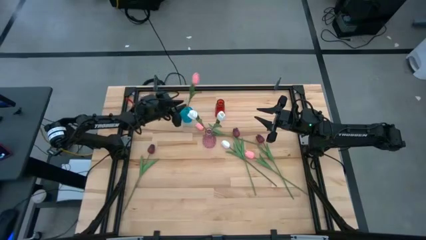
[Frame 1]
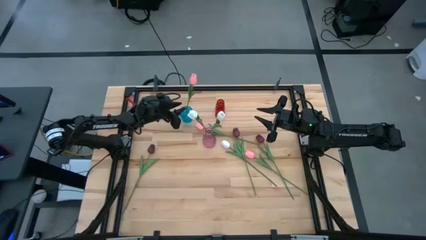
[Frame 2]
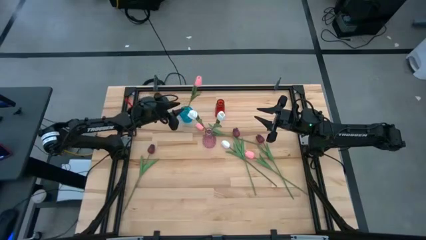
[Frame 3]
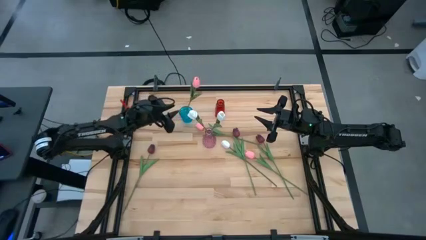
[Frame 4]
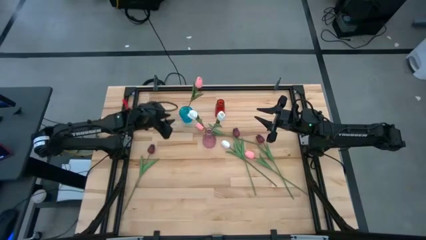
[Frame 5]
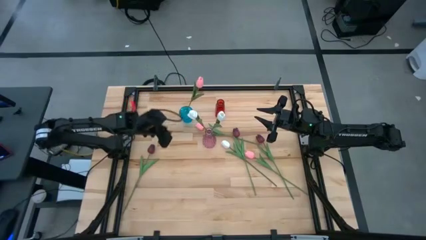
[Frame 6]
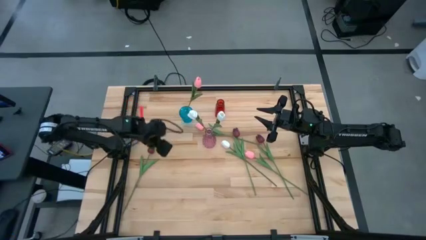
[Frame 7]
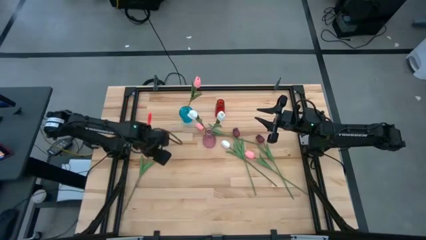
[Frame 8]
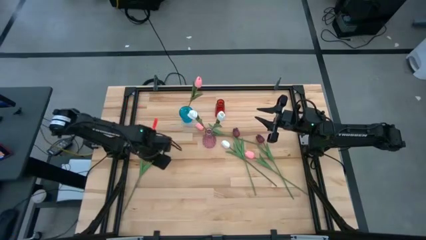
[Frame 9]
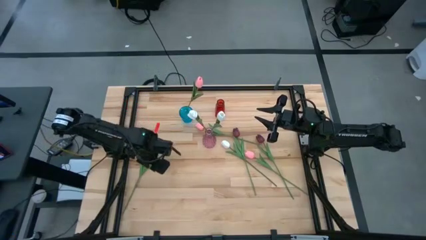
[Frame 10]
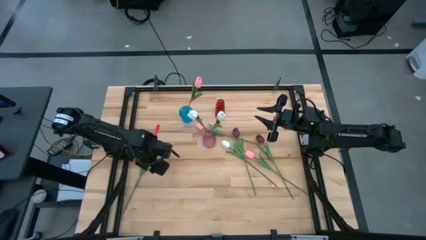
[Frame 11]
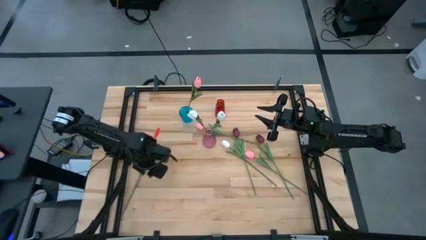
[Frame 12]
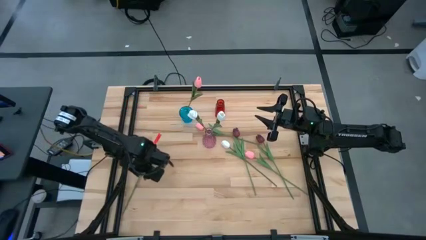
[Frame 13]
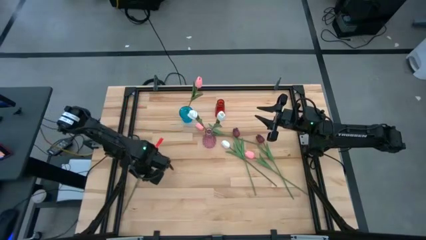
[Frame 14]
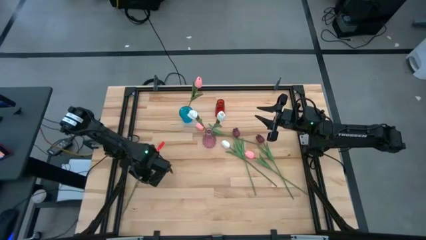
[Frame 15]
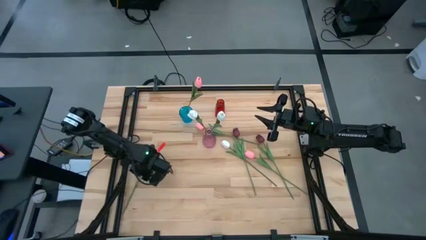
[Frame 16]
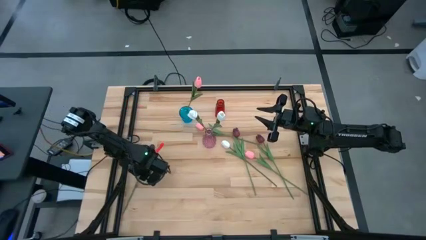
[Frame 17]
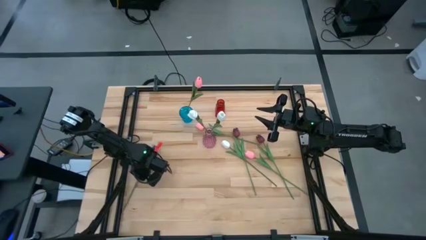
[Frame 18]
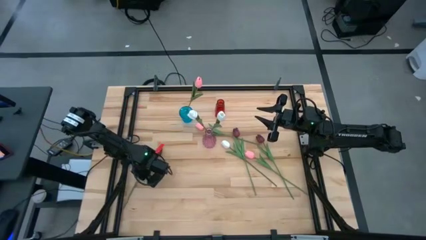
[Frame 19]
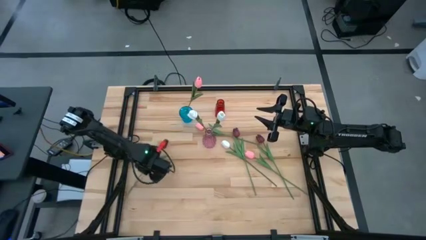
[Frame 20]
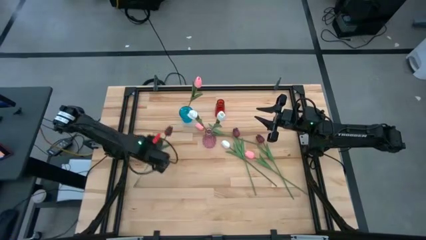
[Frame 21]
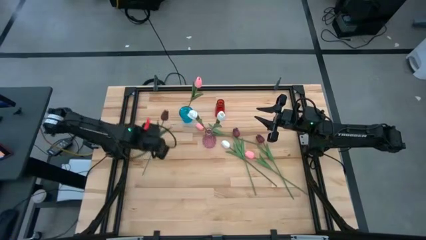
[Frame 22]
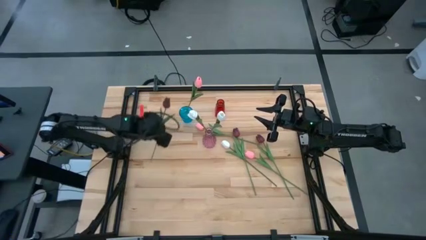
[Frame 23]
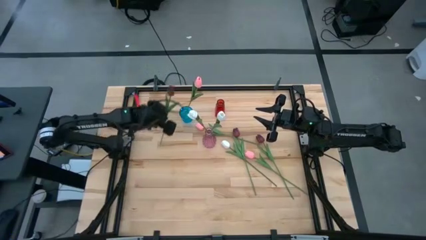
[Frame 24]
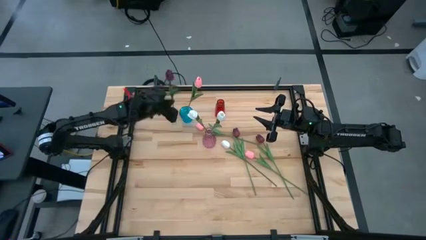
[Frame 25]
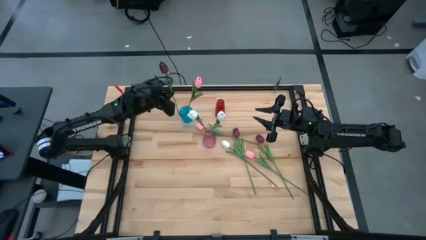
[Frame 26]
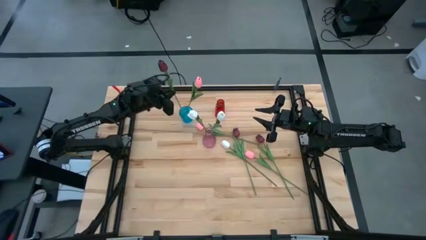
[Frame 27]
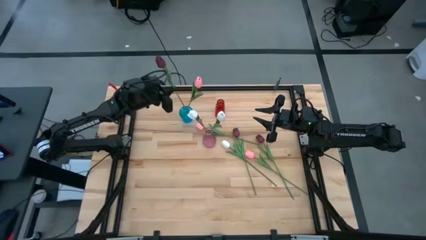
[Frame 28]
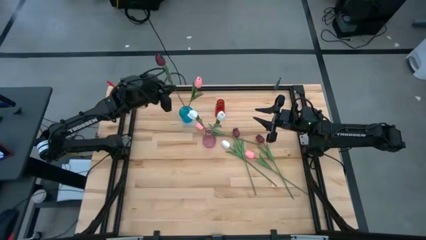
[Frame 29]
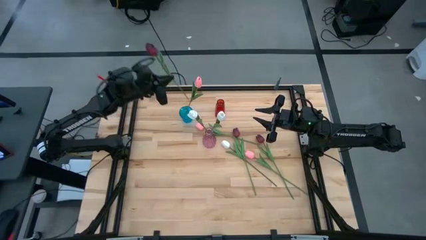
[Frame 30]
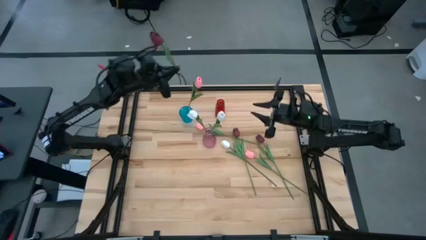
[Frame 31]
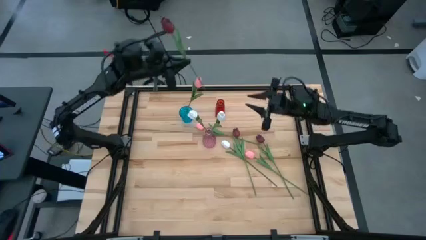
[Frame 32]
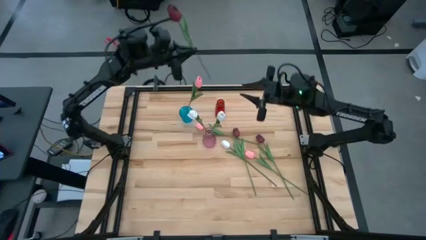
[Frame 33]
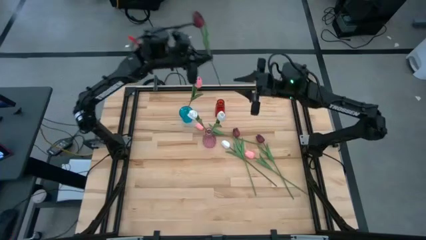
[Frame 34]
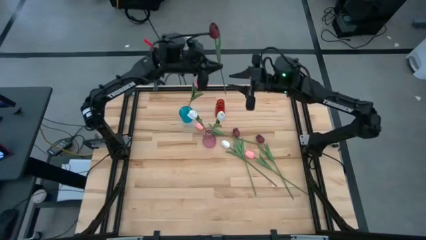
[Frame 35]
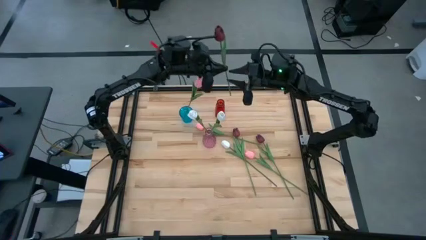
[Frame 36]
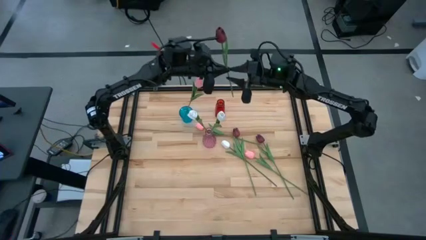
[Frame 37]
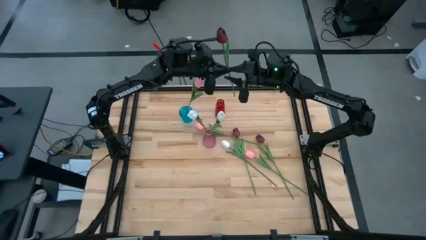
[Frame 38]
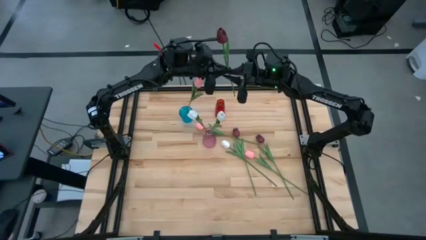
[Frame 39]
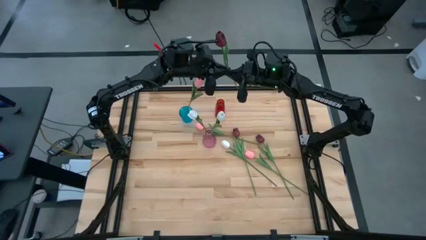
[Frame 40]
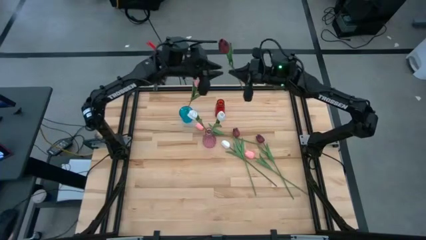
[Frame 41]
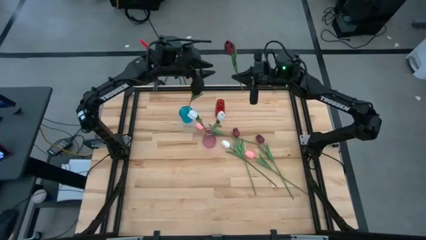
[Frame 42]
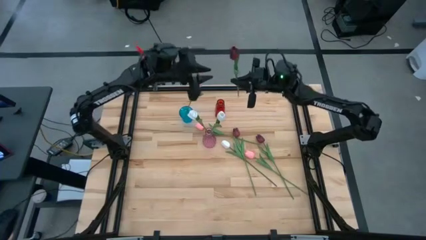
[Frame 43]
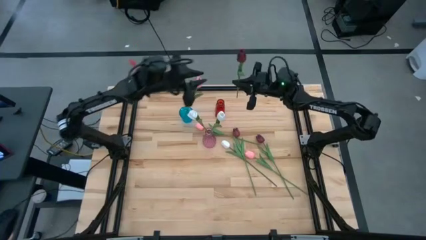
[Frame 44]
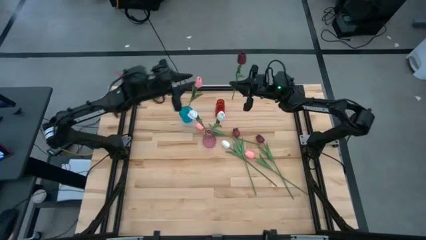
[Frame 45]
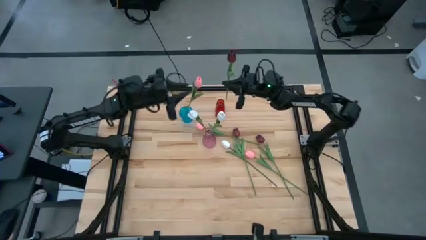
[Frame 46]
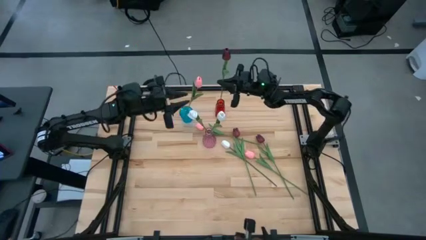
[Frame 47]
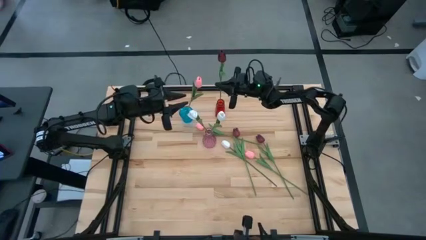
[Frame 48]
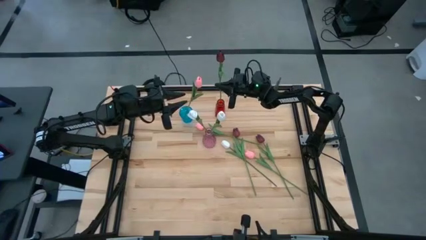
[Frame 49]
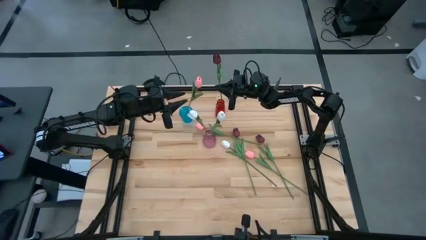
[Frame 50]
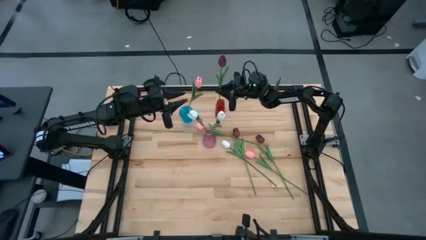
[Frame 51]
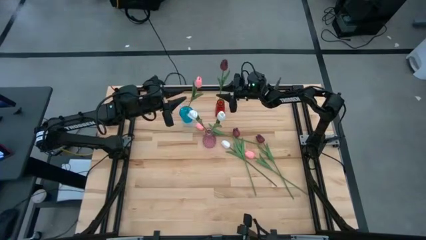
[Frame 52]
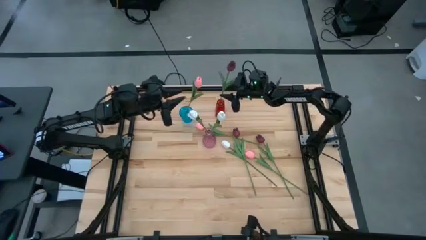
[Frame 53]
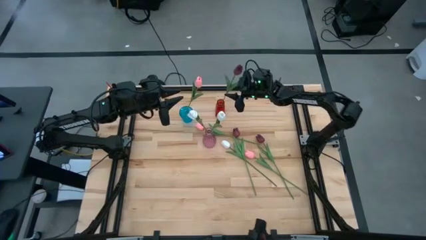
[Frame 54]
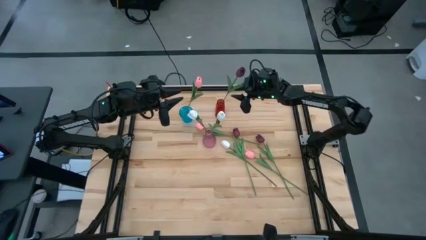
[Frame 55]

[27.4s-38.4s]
Task: Sort flowers into vase by color
Put the left red tulip into the red vase

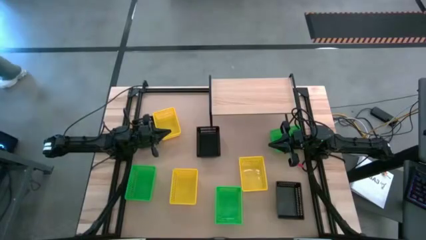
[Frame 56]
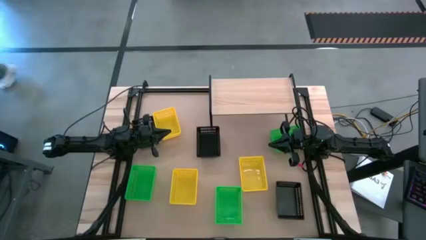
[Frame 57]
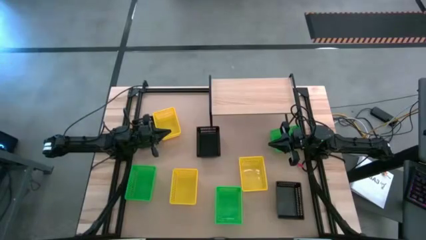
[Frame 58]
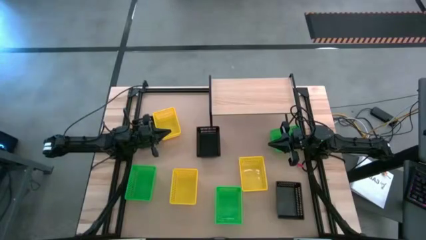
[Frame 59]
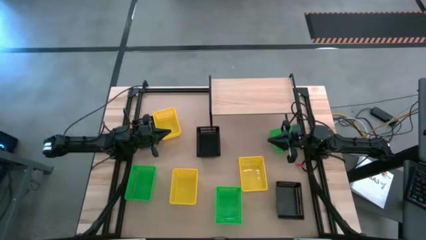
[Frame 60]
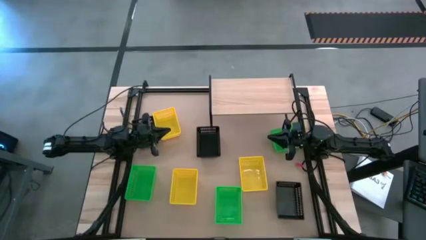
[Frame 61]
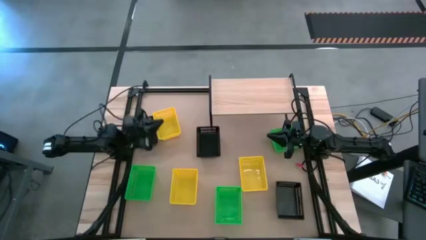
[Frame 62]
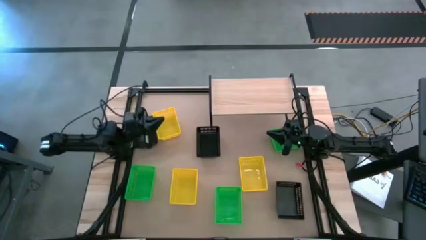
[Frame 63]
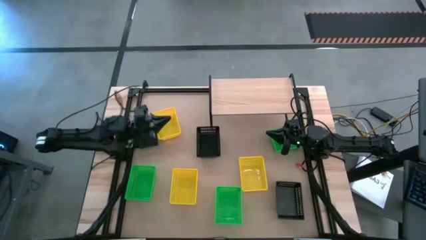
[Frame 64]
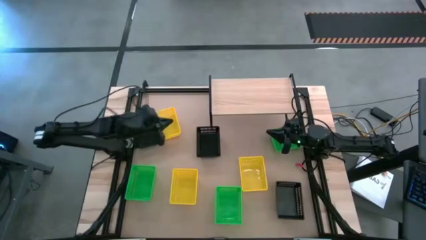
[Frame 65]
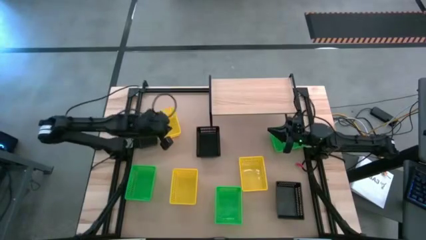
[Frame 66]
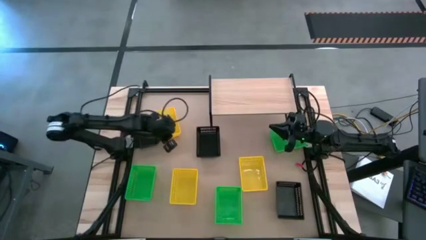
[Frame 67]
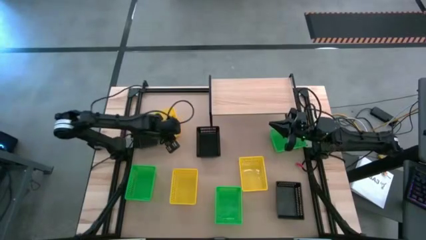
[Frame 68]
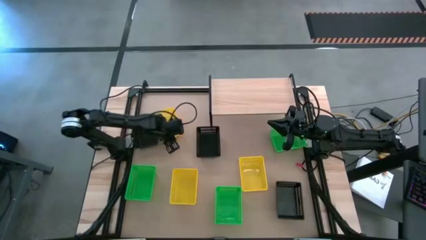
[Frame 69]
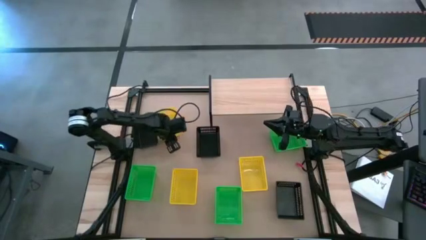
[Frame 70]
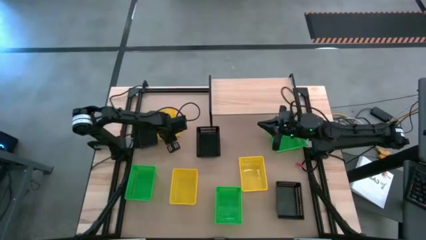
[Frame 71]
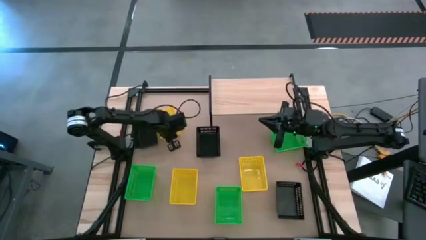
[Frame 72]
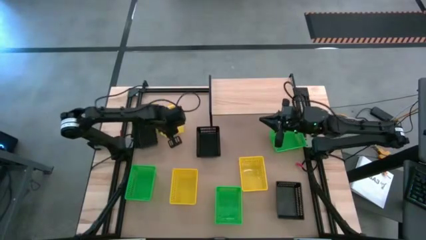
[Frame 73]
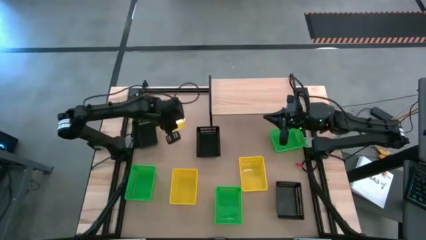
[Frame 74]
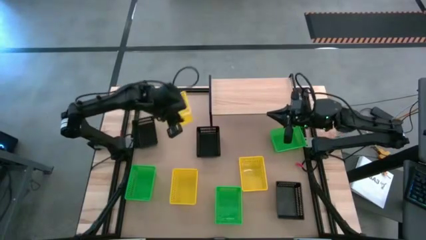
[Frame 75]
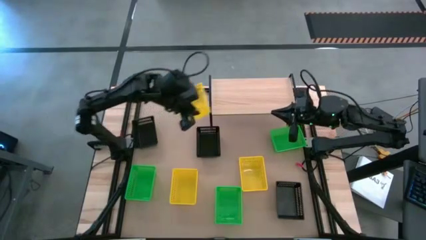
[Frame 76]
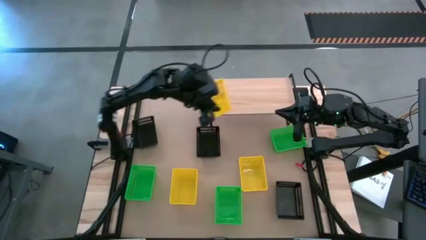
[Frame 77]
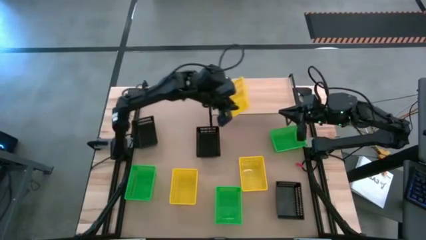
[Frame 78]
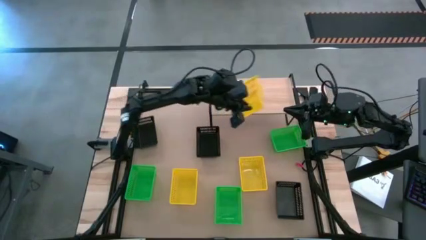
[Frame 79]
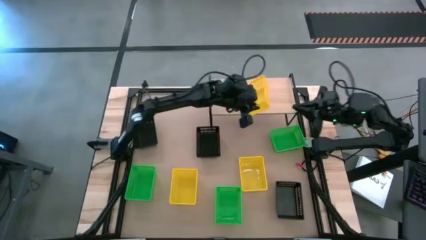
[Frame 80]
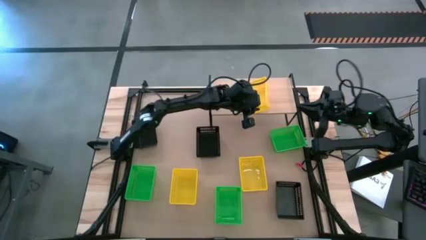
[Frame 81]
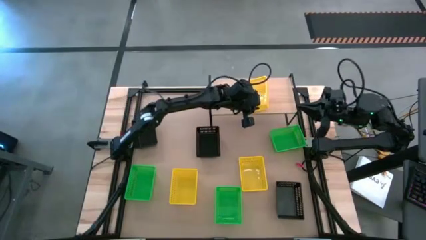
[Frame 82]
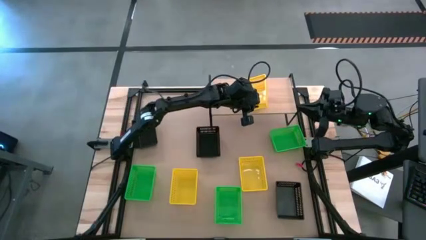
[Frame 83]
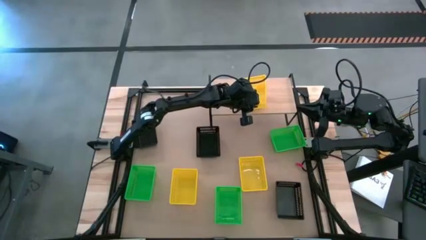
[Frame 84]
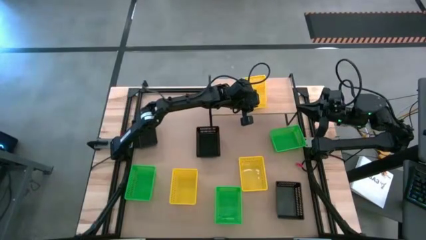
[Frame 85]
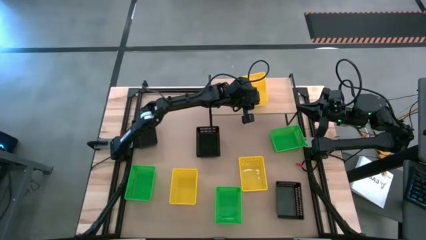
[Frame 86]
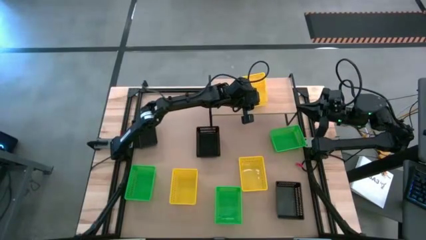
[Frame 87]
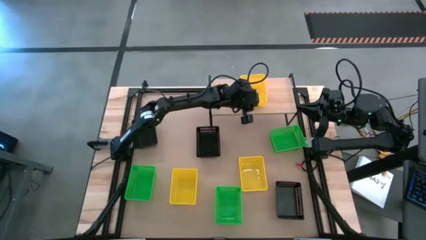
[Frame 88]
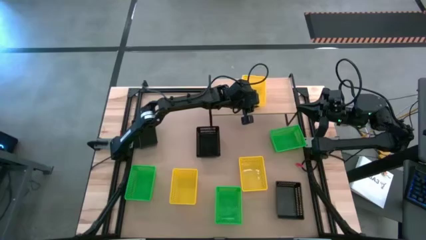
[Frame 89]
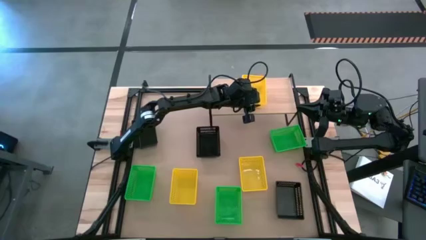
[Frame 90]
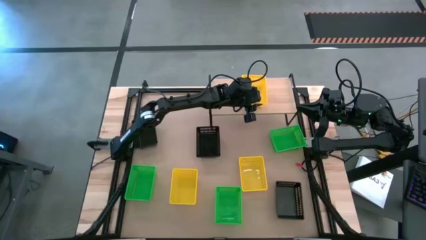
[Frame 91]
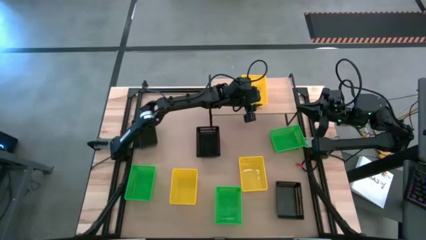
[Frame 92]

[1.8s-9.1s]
Task: Stack baskets on shelf by color
Put the top yellow bin on the shelf
